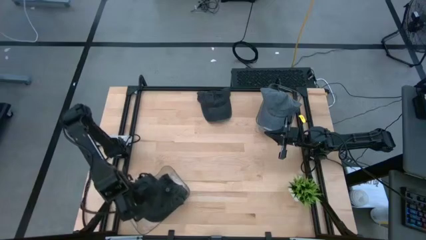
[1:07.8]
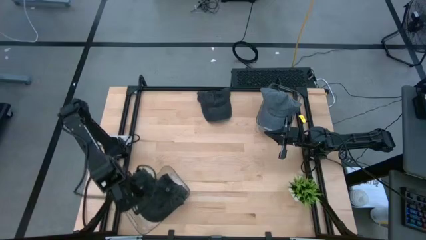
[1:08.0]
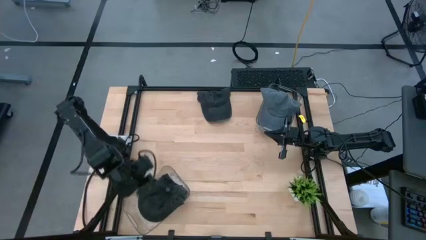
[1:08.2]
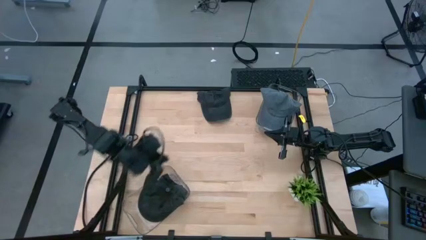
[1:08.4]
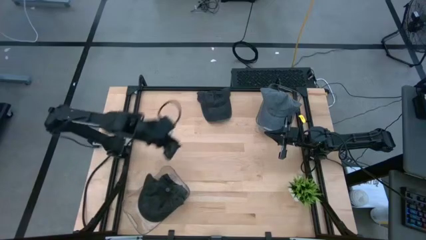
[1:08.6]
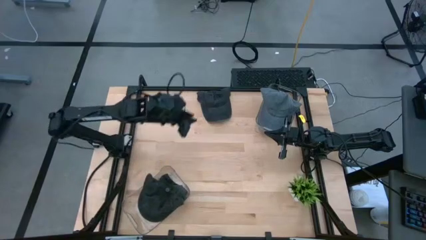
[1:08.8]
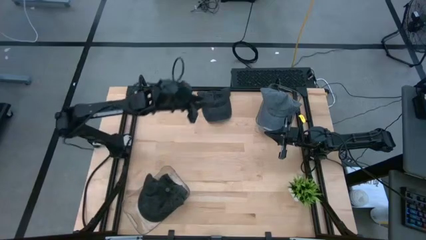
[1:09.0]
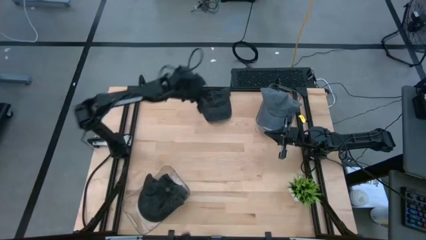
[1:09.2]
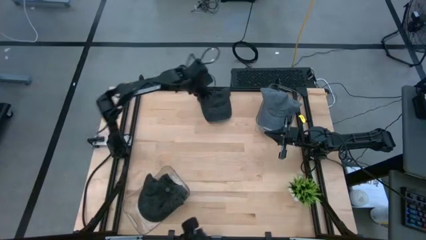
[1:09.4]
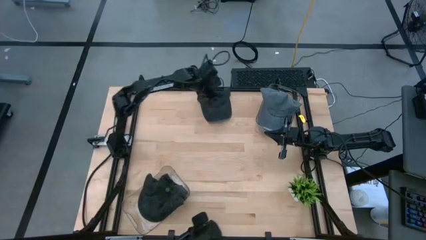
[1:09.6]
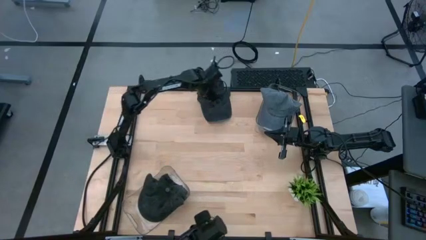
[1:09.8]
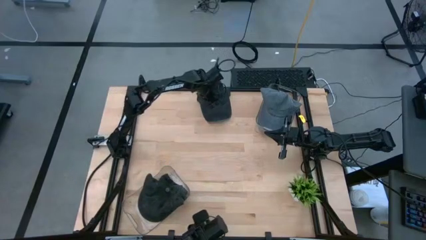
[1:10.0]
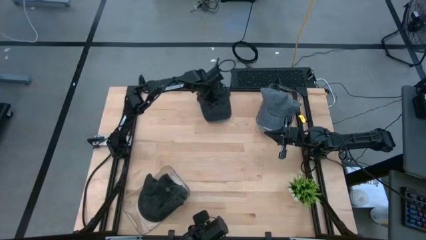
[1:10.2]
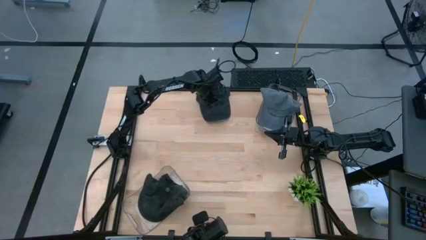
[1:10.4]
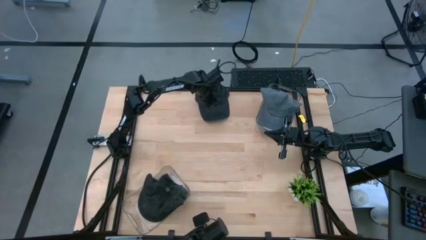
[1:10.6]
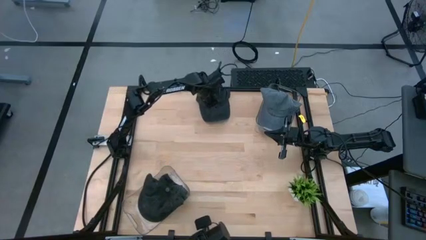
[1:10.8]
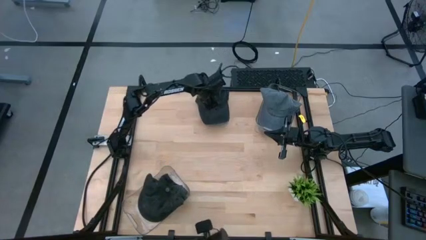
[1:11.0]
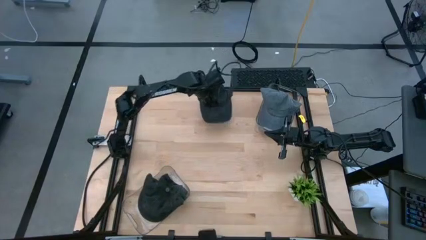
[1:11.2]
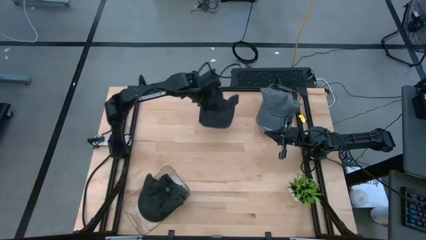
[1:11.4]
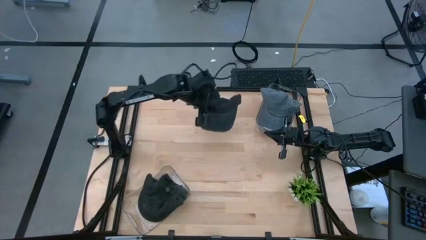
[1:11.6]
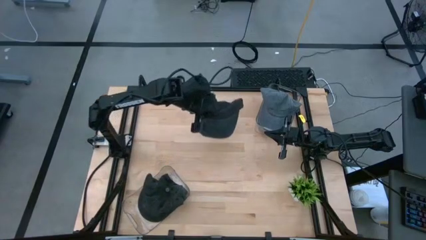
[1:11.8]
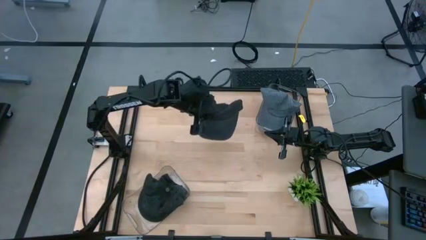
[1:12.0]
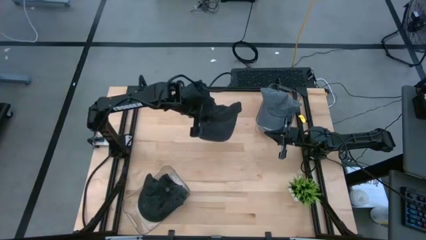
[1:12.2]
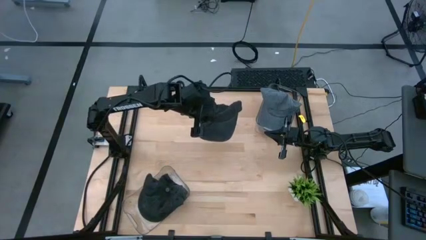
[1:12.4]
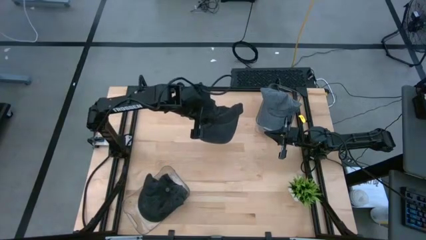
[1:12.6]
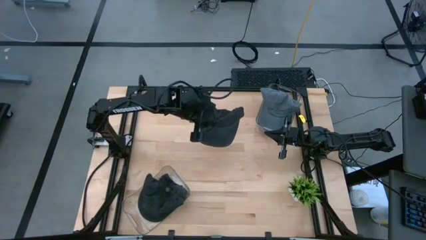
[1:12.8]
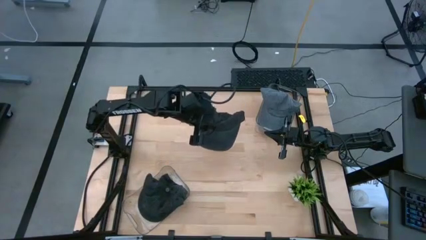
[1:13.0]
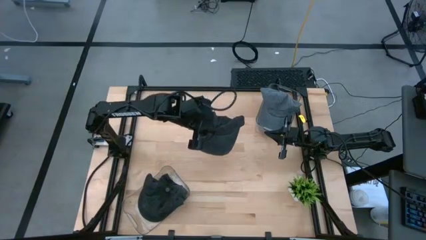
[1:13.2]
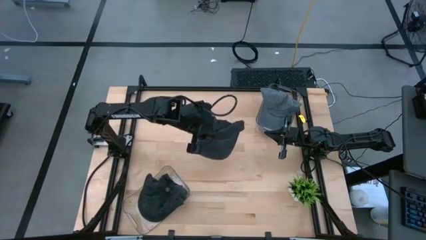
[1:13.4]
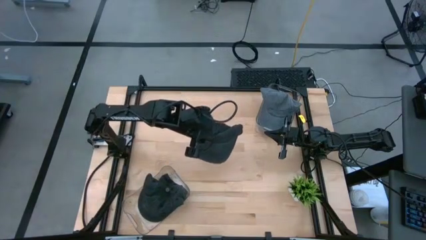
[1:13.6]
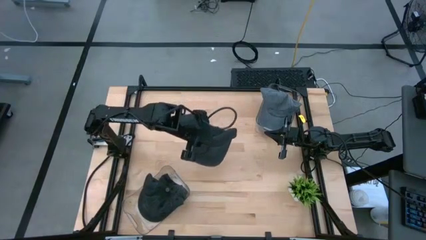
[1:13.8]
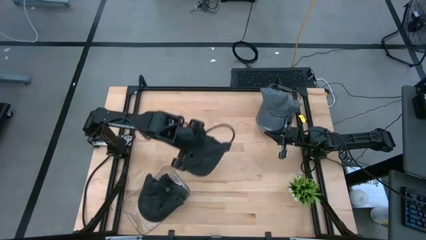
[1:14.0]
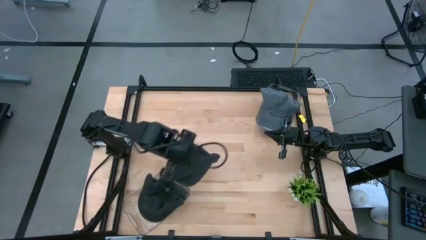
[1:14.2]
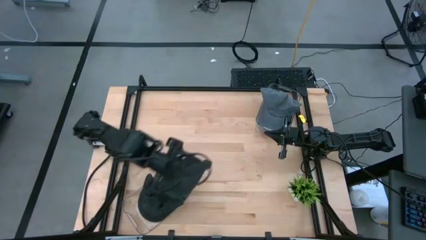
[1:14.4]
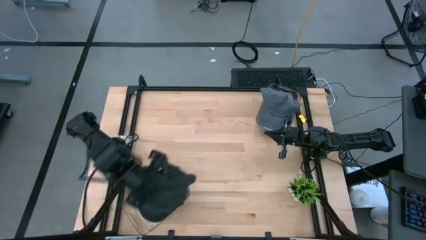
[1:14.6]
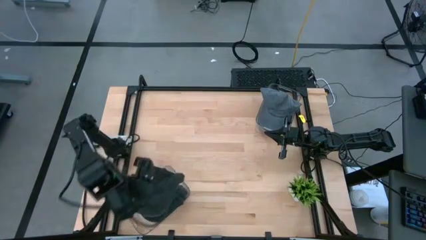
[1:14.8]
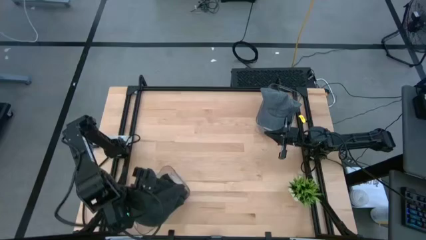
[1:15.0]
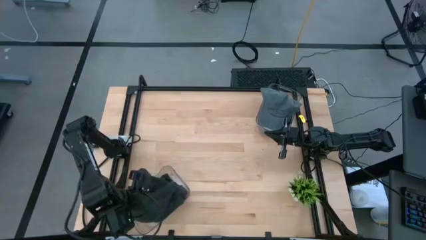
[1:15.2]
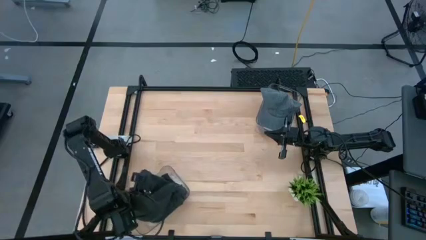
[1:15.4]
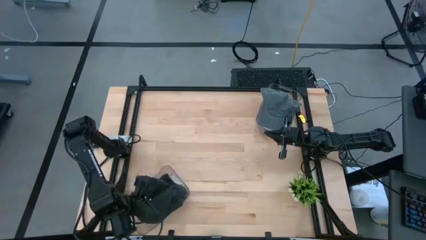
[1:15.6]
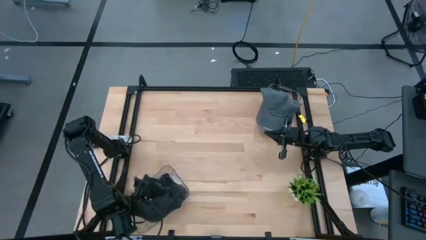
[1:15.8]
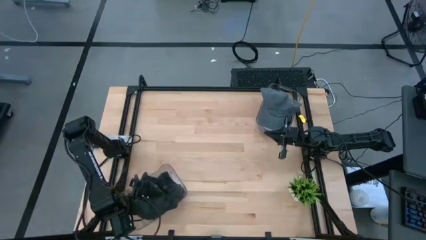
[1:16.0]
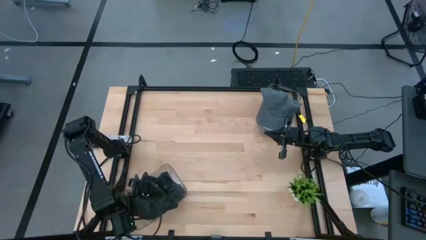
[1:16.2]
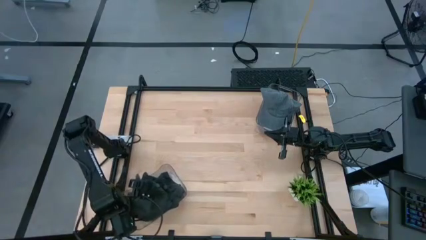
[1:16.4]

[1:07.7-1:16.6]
Task: Pick & Place hat
Put the black cap into the bottom transparent bin

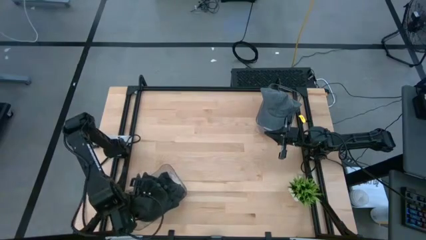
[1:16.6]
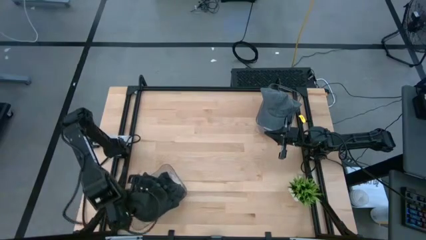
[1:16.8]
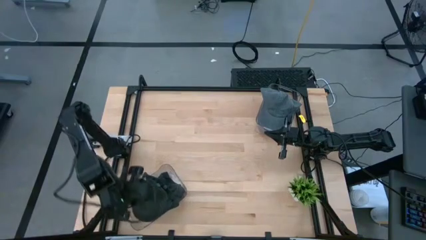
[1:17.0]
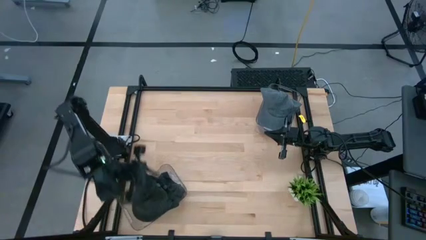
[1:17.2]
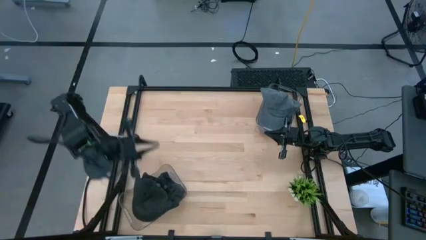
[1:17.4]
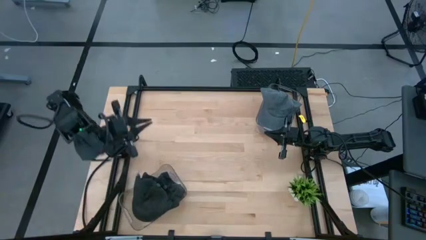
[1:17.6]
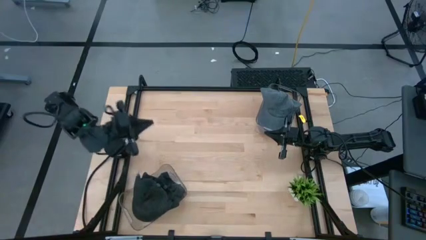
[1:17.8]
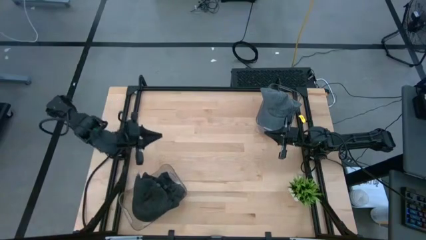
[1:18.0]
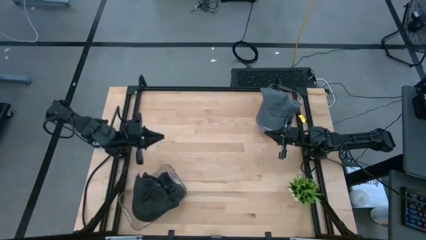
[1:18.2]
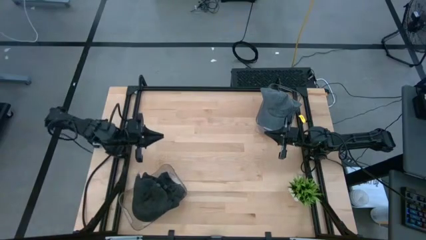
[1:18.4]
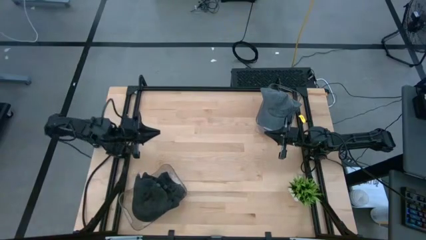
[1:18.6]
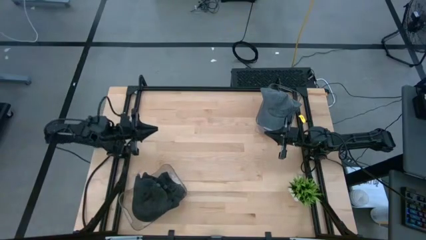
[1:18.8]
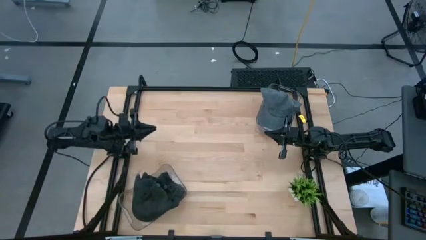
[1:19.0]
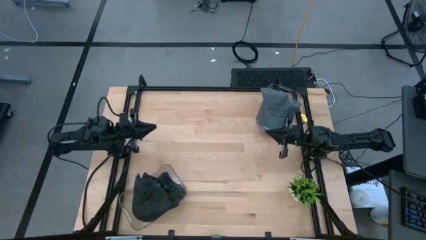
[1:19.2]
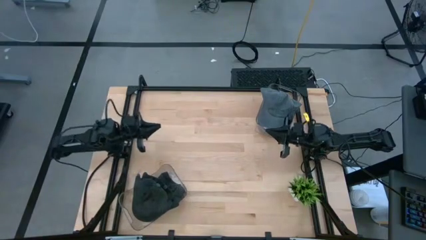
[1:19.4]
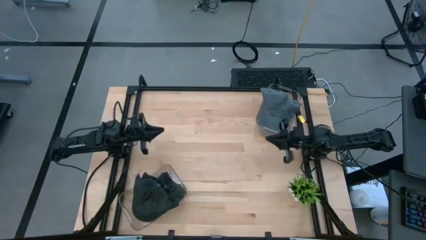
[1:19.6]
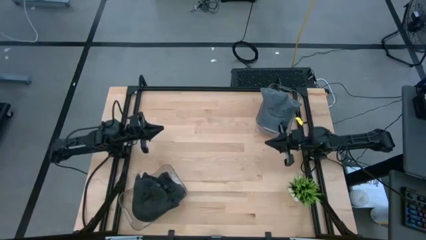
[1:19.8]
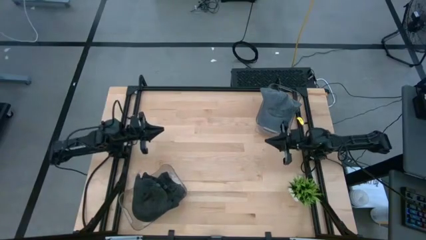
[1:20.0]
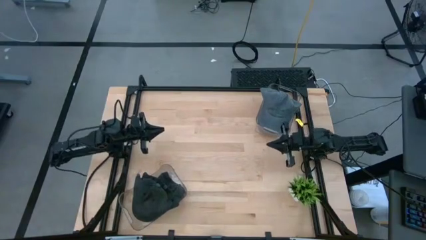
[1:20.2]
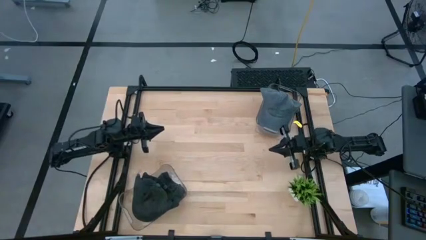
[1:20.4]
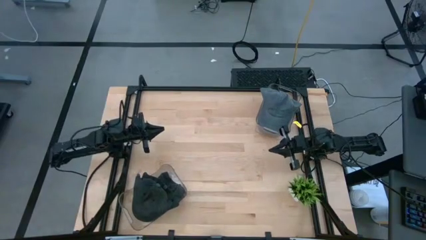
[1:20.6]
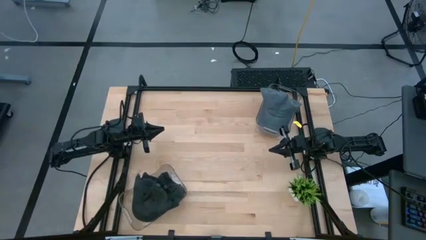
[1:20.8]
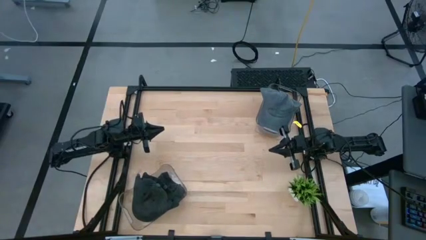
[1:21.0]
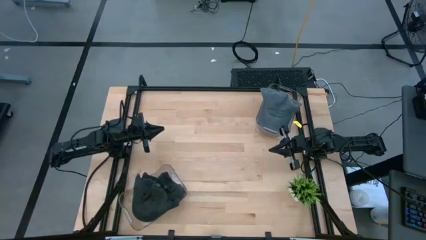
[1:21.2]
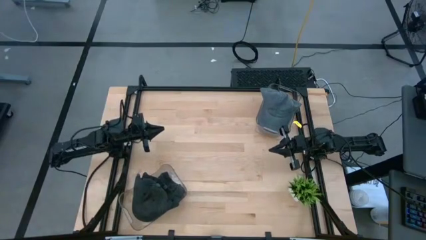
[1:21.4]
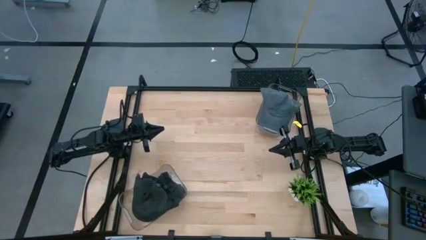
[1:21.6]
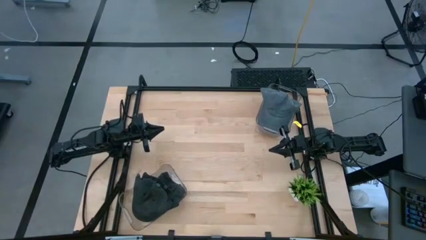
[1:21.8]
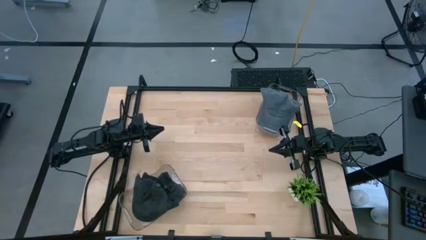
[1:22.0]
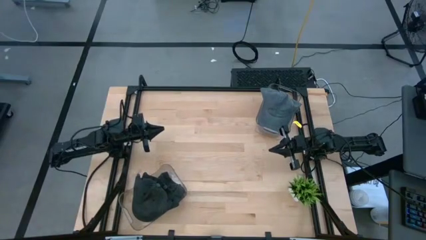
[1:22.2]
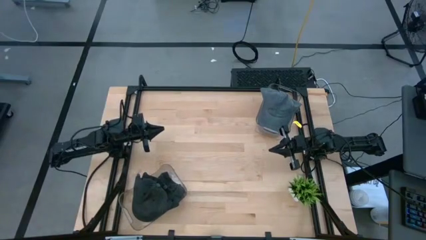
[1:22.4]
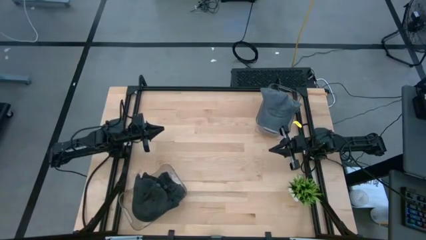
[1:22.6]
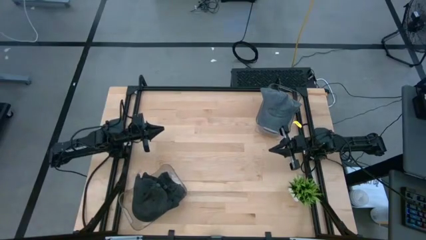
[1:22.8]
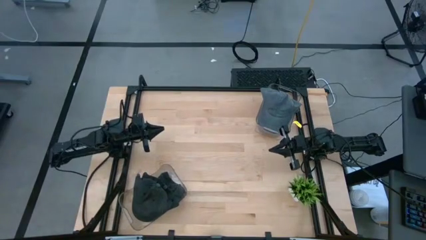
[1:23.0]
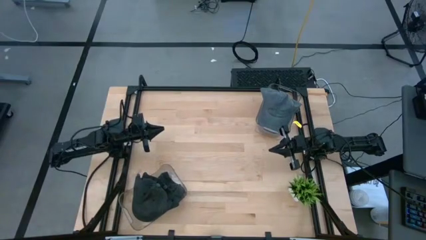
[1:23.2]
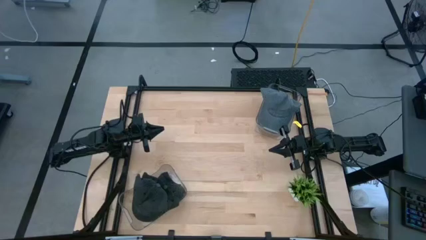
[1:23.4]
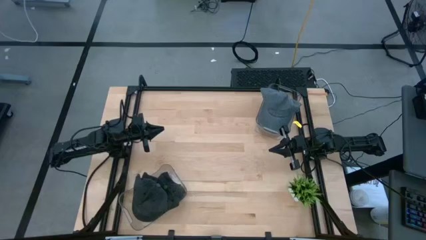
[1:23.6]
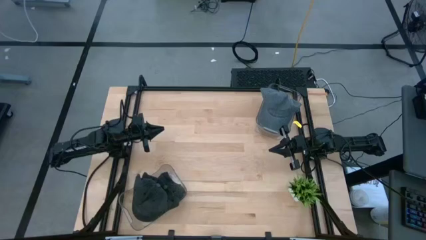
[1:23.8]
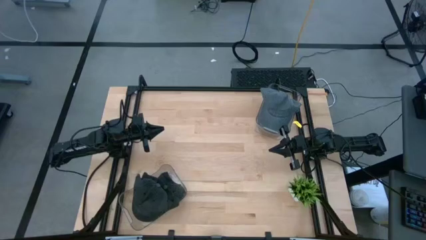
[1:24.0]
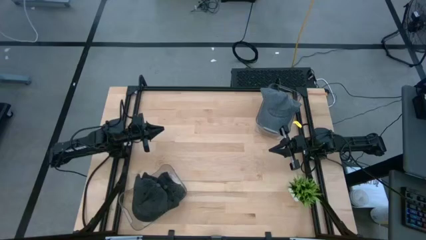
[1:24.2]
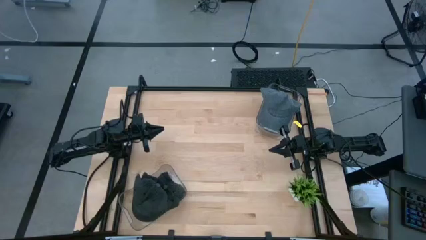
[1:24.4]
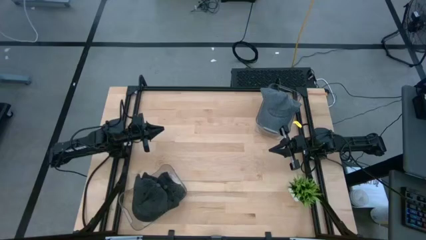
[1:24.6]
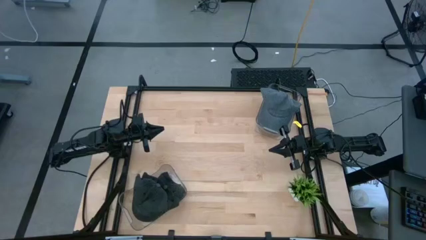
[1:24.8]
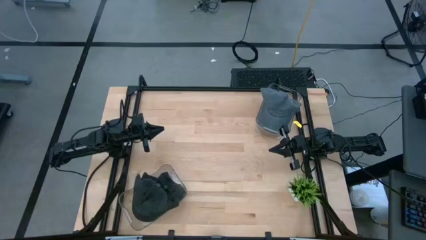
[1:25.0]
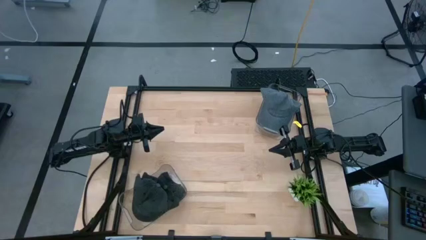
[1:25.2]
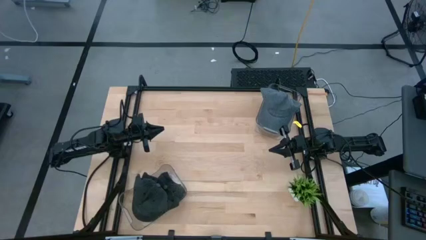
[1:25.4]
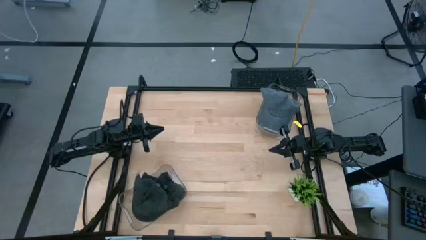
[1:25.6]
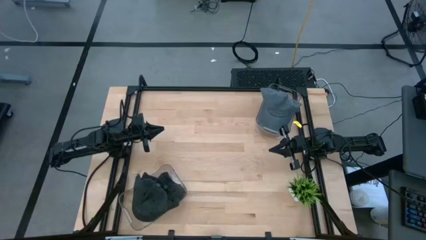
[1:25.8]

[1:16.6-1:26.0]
Return to Home Position
